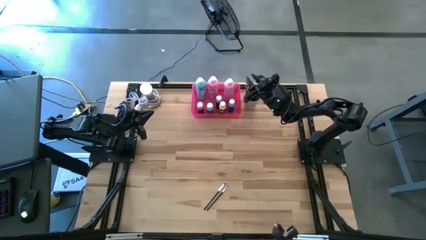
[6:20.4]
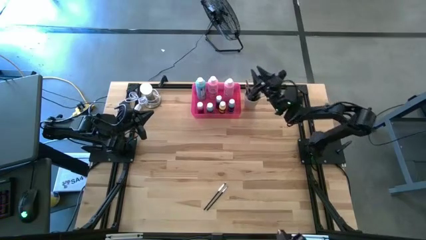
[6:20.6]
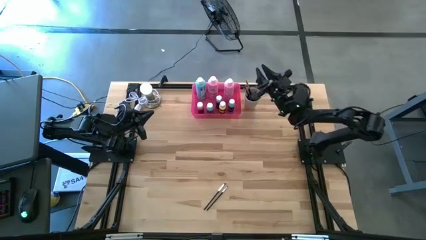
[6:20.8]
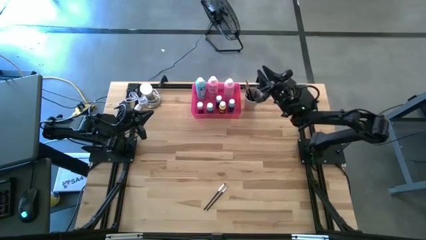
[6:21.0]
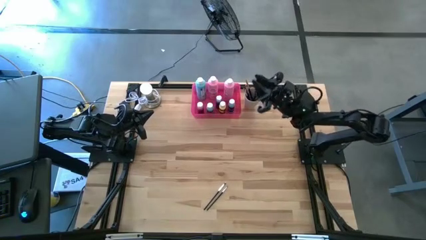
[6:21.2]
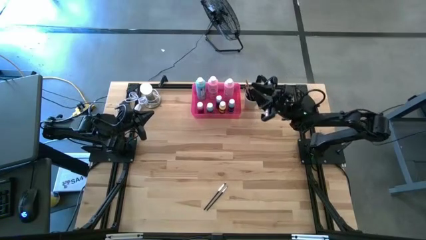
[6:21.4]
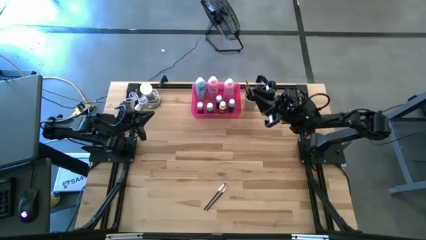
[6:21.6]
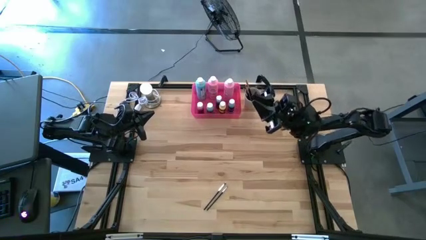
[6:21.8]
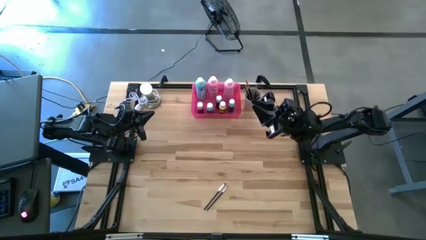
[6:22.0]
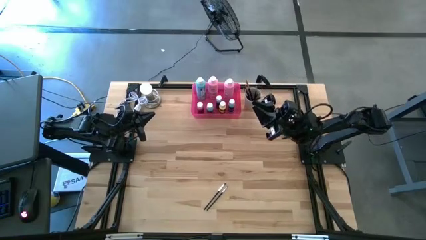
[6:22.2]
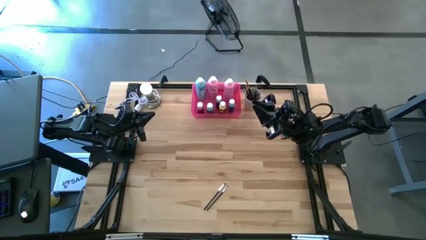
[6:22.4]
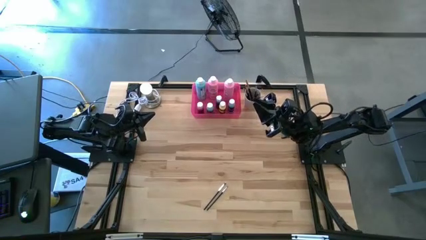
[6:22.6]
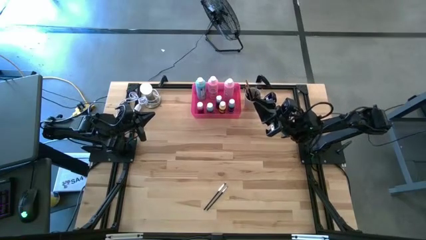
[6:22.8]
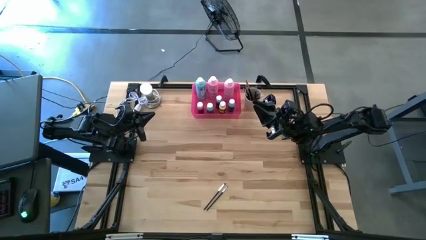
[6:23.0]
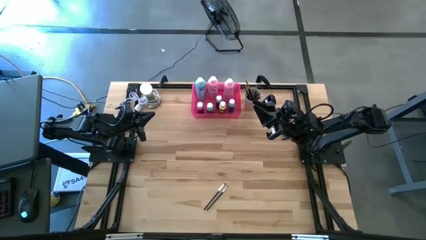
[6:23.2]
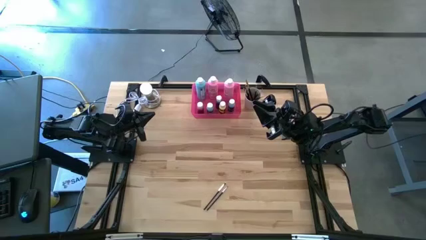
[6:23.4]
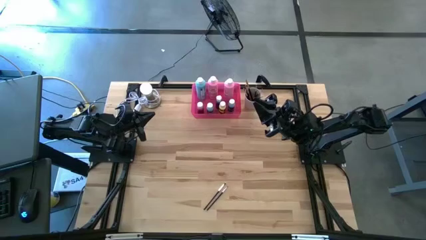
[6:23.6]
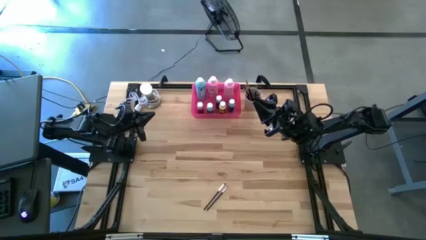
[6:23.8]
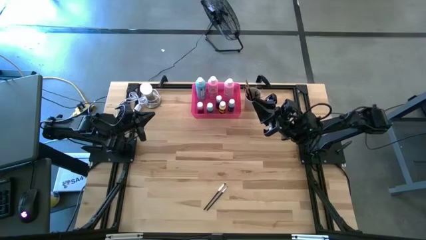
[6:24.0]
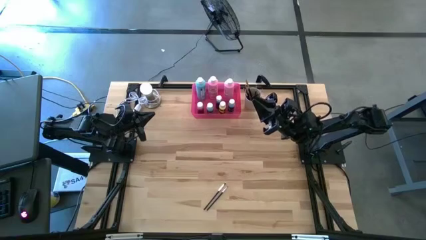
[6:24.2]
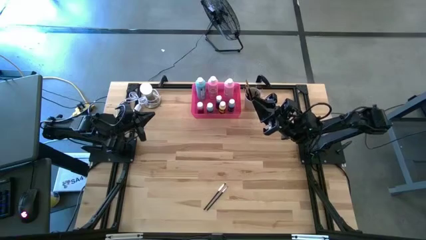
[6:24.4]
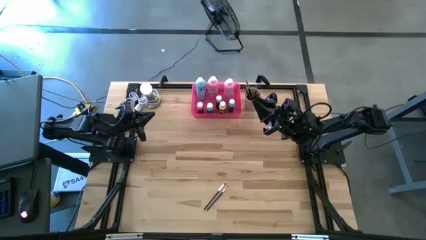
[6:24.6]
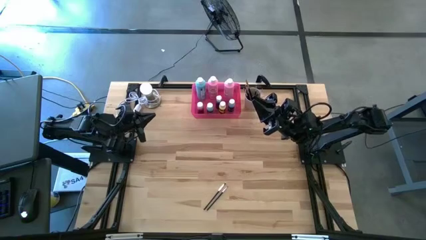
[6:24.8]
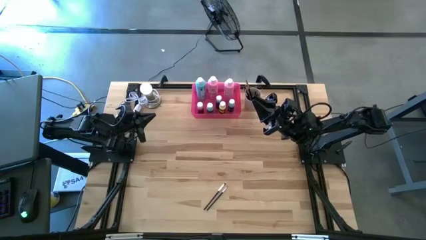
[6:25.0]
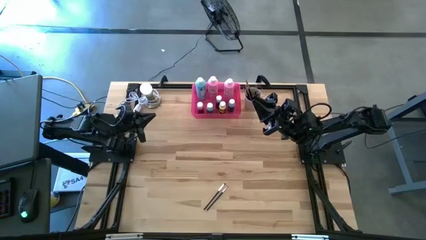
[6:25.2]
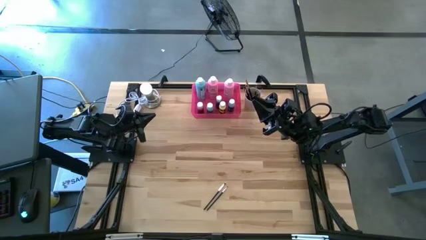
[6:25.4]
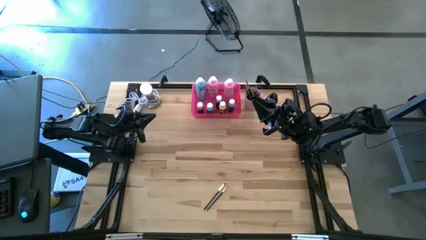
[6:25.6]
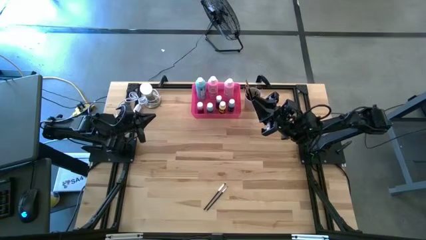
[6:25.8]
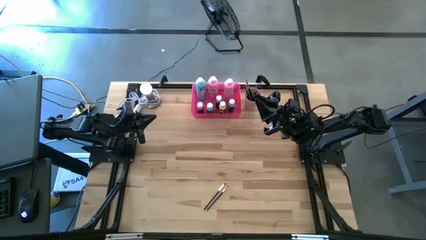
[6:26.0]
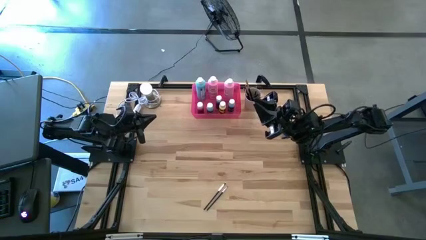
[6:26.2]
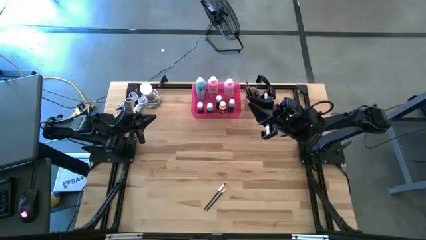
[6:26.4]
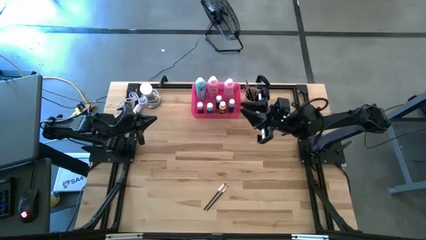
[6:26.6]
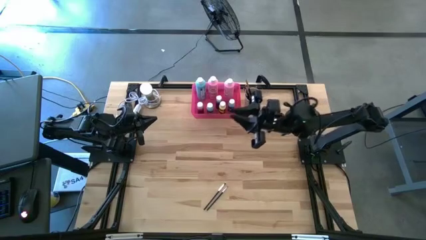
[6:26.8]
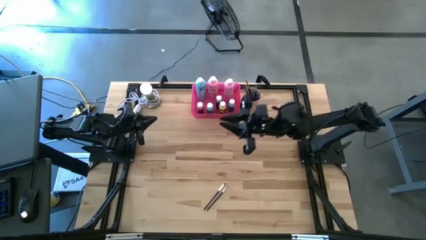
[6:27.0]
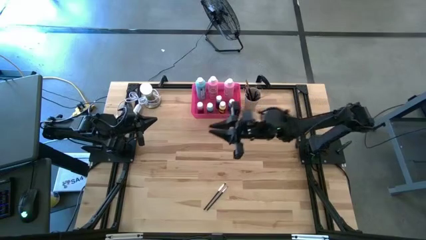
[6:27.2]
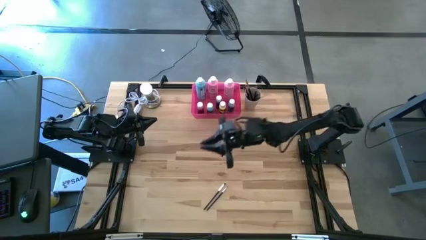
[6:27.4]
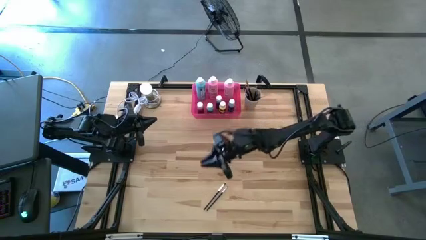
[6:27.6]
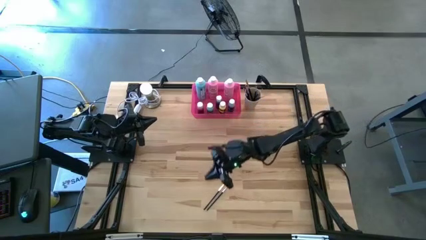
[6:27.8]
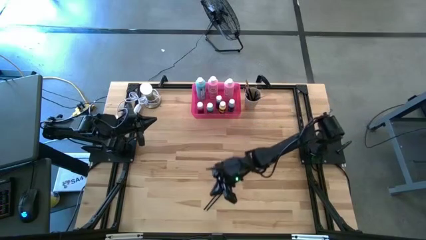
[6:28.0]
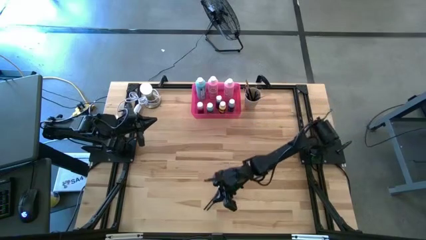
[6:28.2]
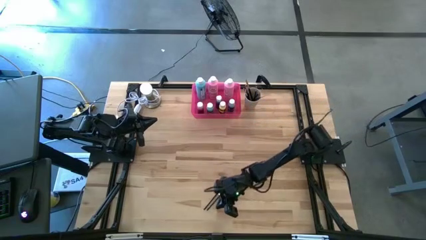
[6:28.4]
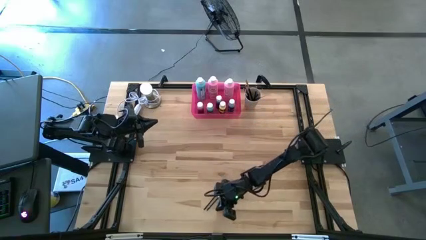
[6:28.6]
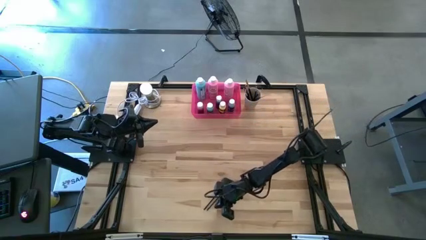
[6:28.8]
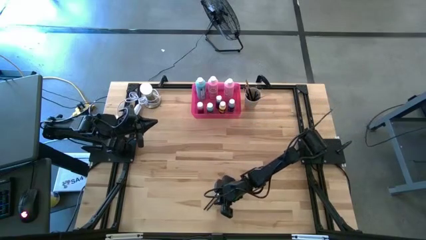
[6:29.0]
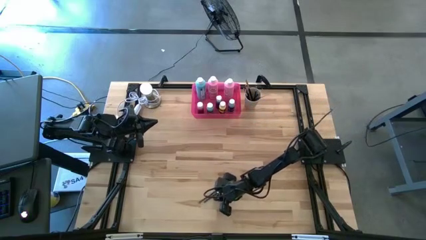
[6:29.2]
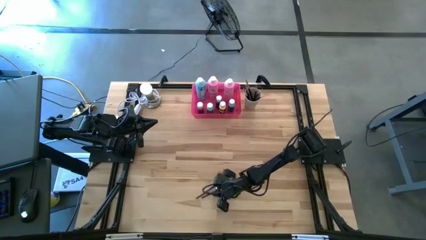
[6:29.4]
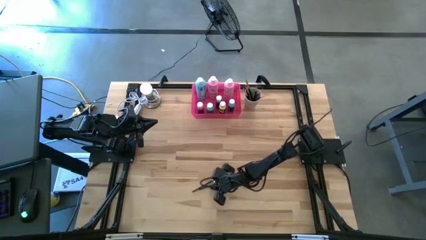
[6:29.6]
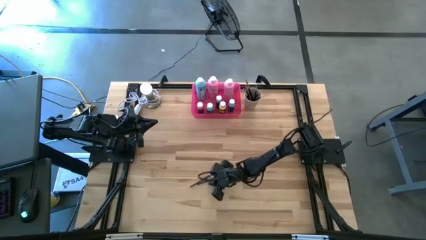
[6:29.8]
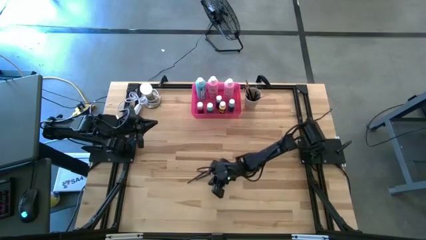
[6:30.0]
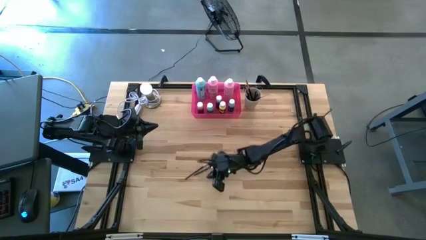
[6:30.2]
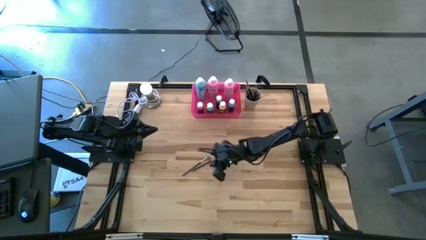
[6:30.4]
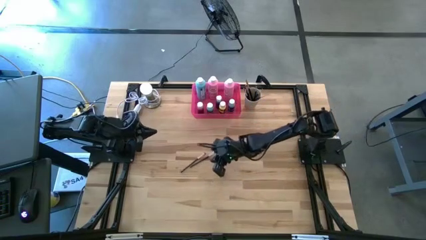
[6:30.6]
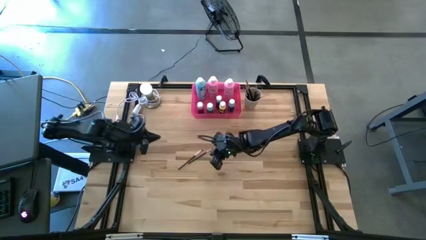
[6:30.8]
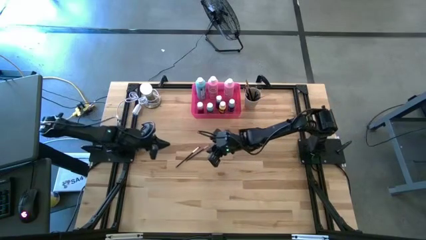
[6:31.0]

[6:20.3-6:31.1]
Task: Pick & Place Paint Supplies
Move the silver paintbrushes to the middle left of the table
